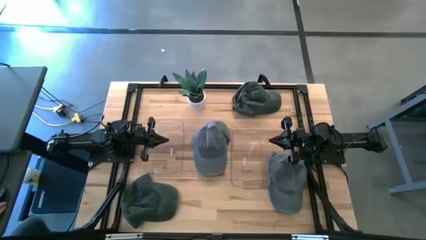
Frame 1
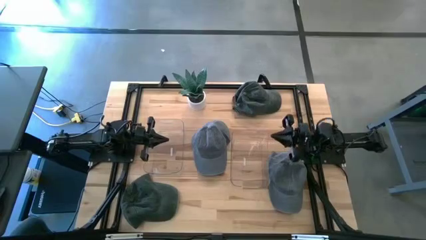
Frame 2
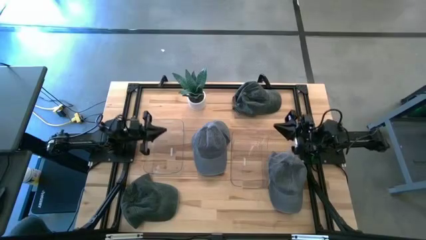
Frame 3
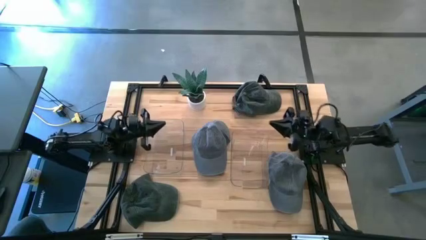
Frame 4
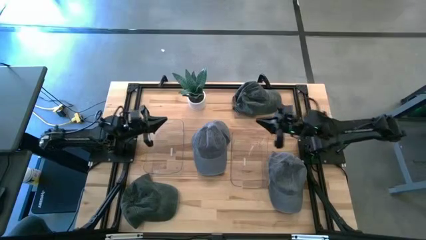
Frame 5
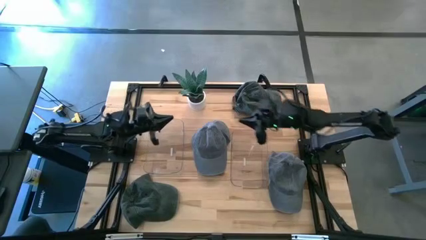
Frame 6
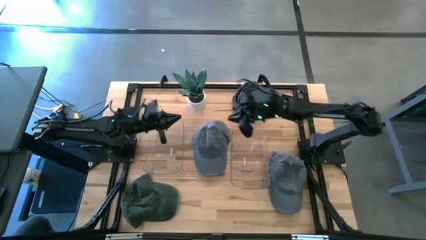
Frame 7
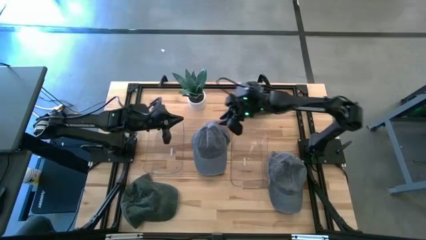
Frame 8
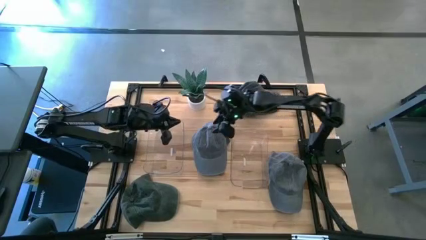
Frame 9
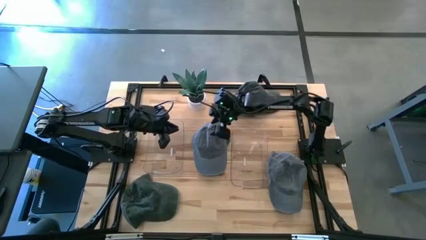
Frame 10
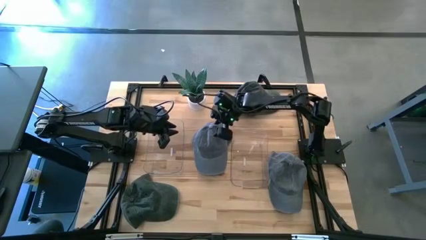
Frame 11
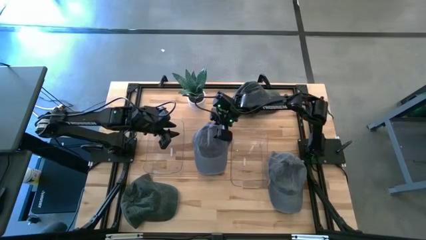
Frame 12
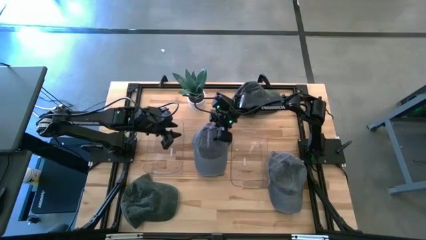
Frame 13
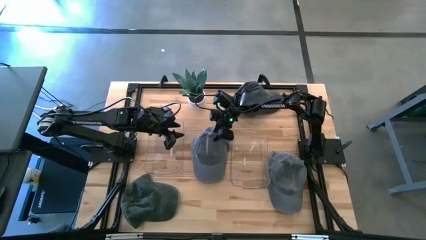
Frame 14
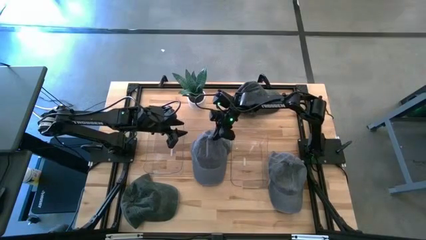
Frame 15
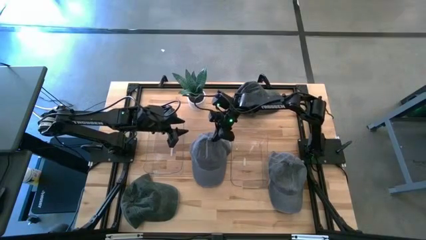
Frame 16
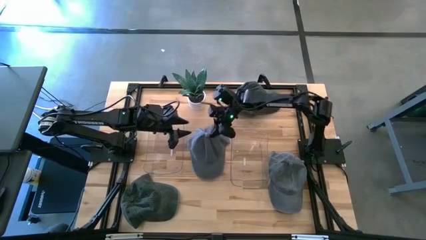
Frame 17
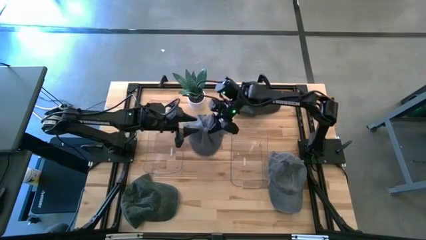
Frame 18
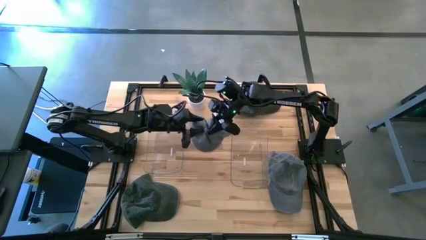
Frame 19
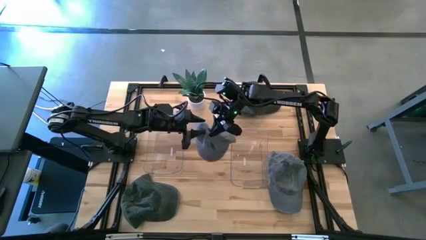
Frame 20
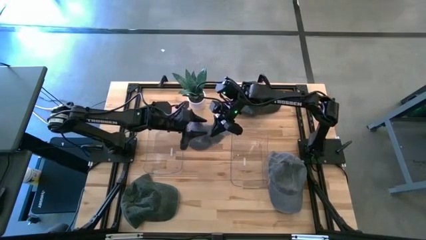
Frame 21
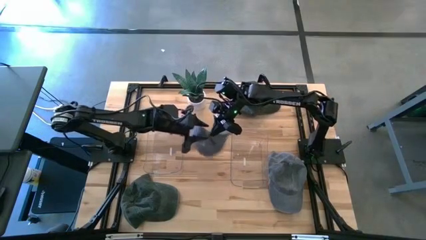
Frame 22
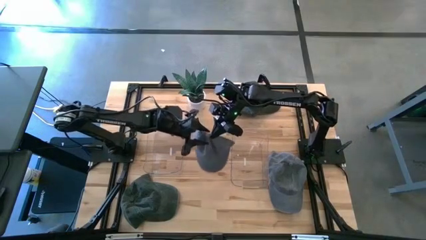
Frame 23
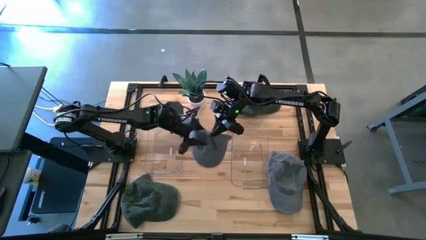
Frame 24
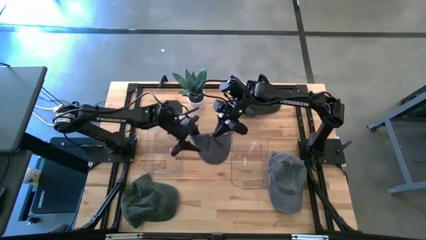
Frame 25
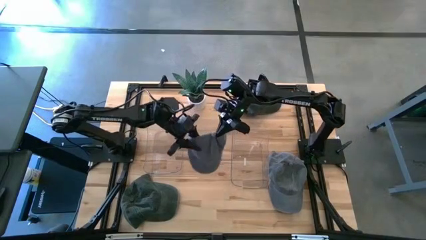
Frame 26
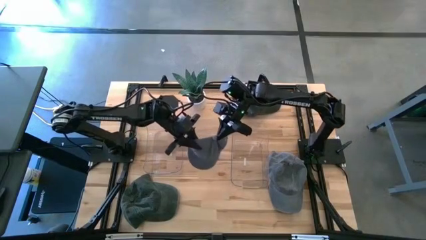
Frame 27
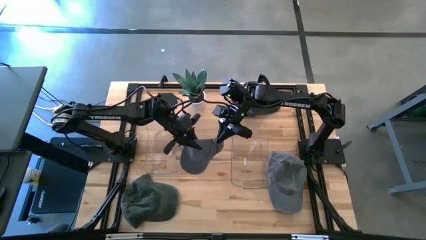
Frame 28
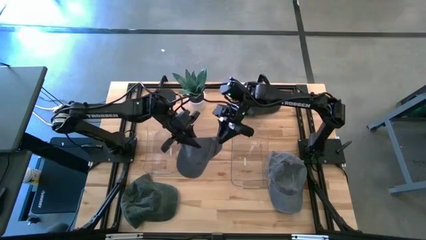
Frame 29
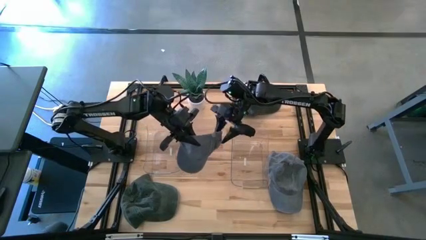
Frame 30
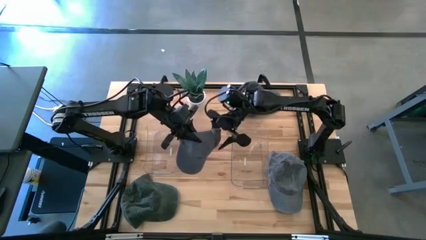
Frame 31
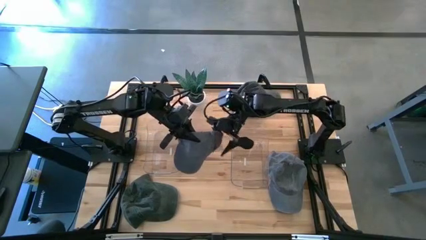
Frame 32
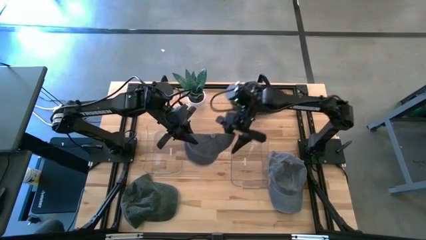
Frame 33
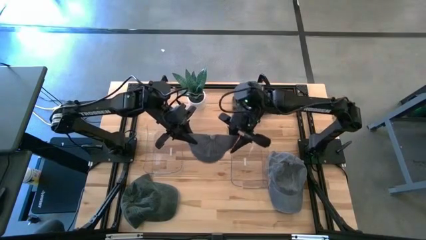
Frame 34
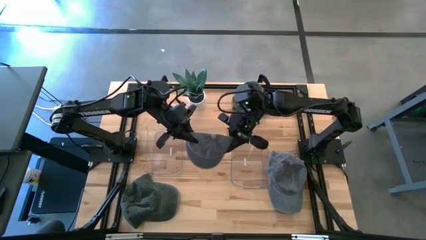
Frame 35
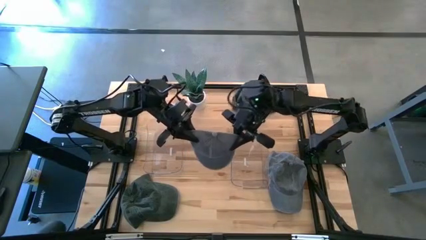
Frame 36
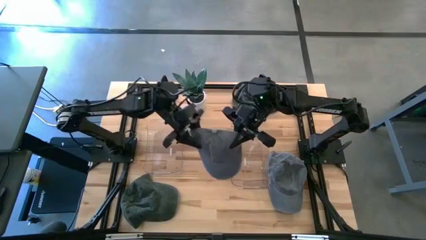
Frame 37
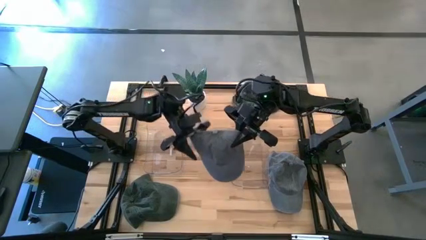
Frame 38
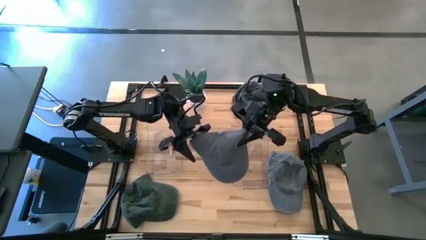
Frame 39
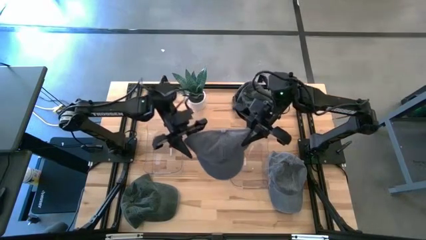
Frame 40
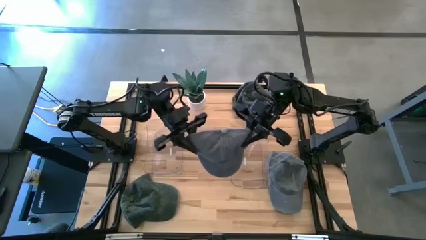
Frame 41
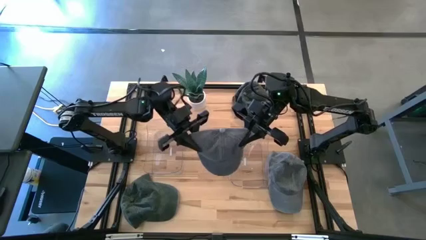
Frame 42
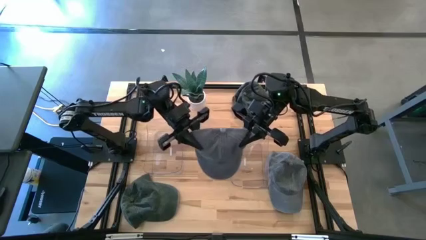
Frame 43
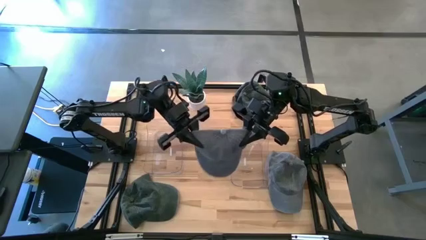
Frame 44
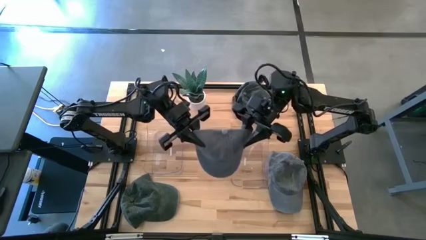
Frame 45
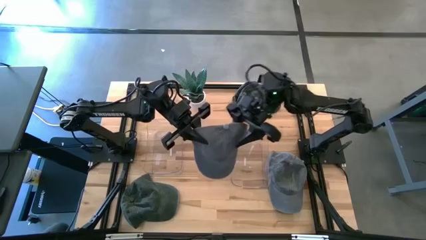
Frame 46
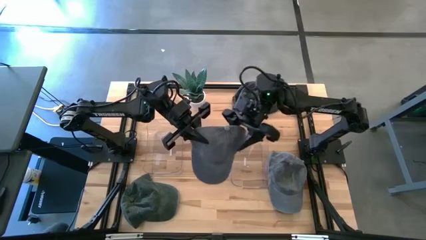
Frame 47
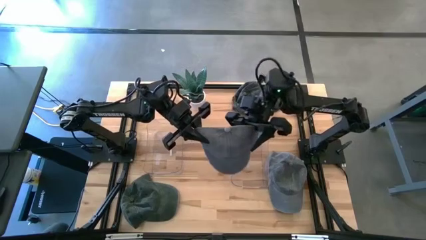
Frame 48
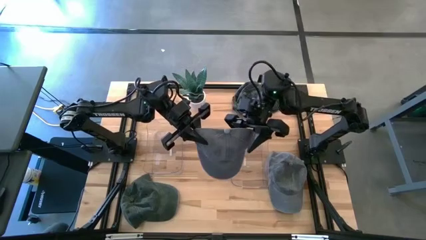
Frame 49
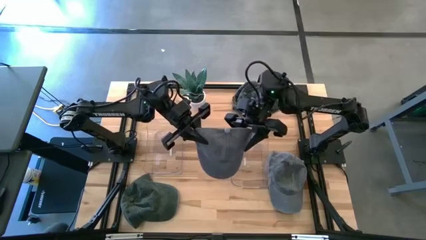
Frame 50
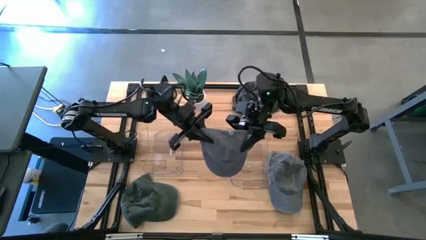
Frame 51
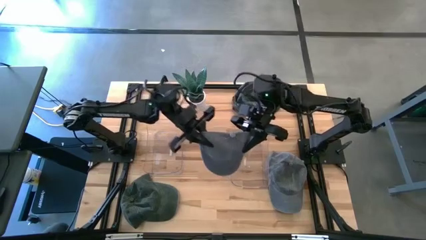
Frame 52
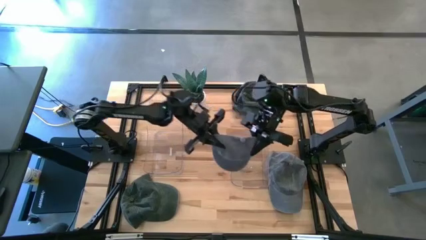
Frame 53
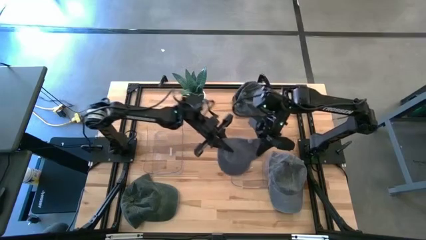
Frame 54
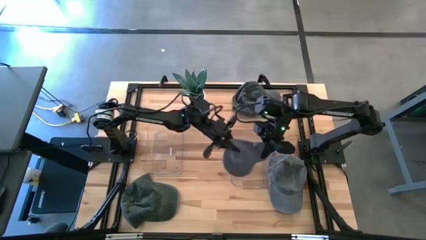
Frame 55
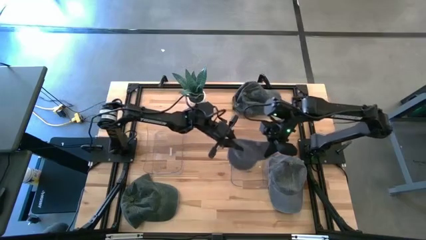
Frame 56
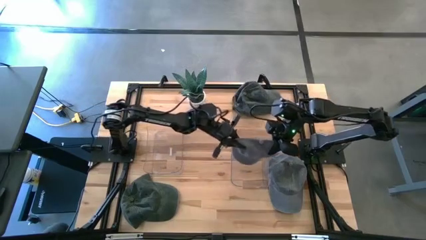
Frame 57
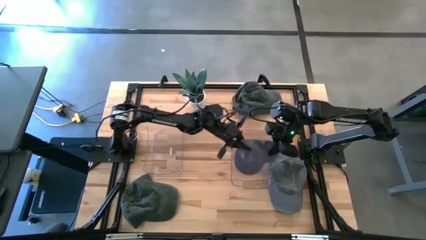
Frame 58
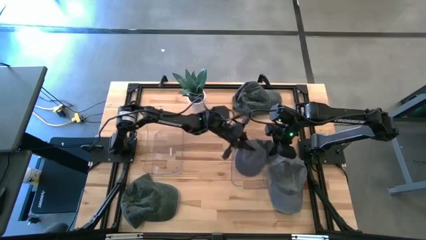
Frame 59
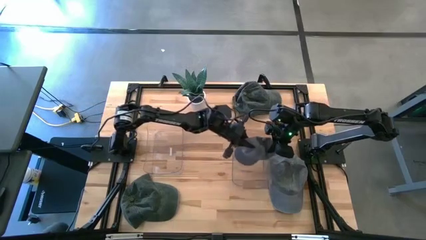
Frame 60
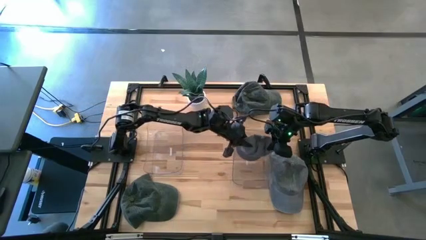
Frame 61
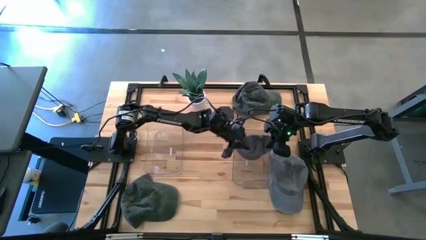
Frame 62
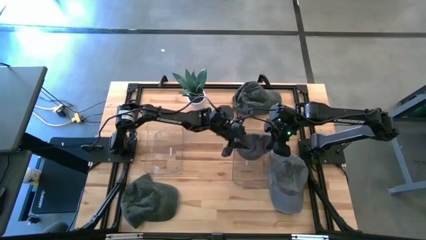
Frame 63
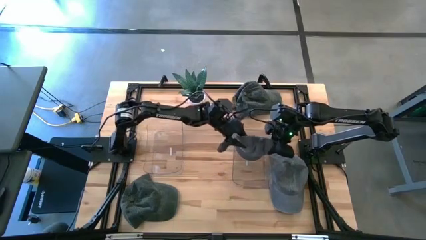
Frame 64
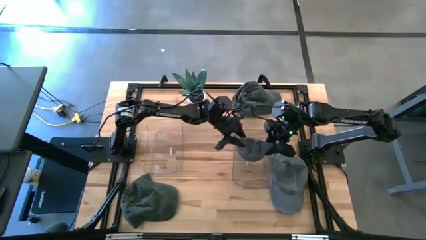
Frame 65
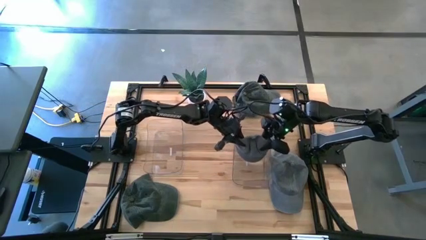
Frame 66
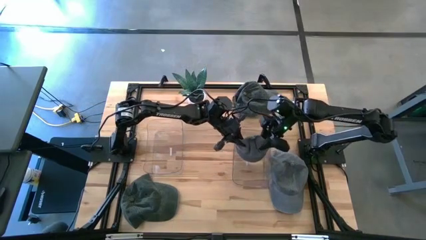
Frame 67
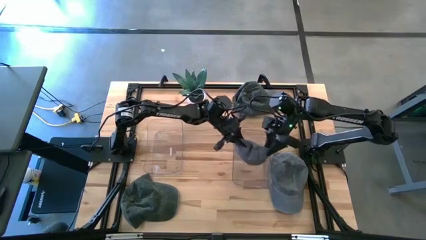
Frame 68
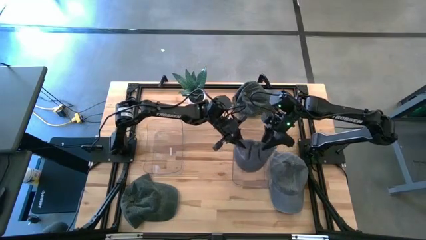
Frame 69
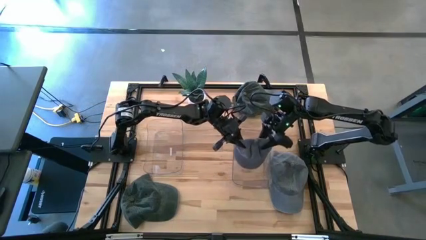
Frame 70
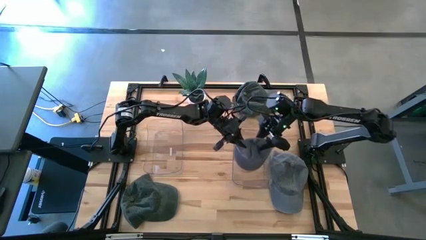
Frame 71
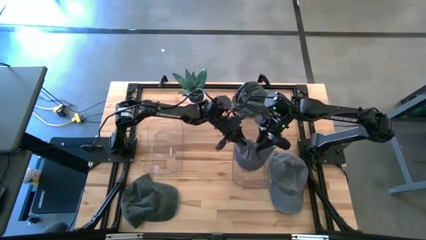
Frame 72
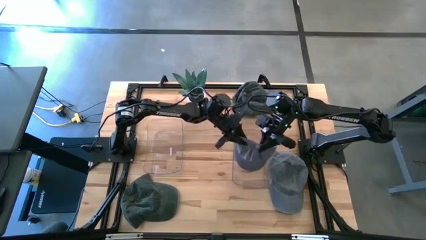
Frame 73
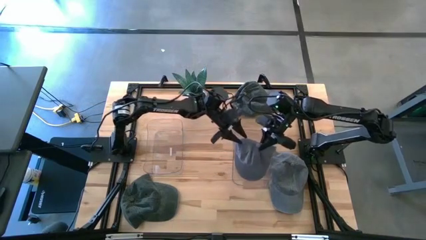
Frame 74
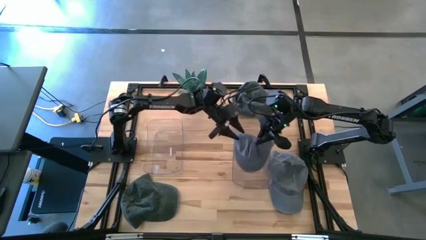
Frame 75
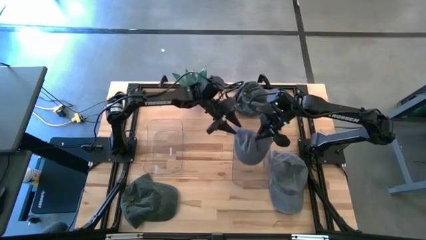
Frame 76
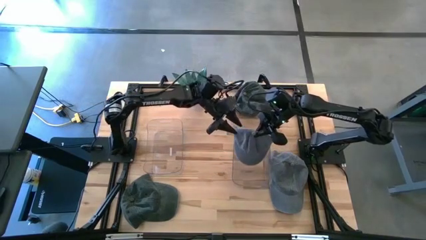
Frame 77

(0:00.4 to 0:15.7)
Task: Pick & Place hat
Put the gray cap into the right transparent bin
